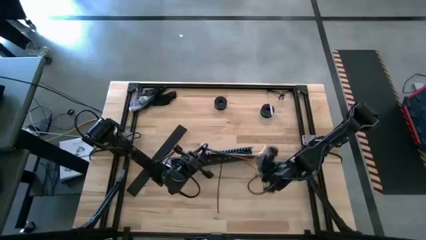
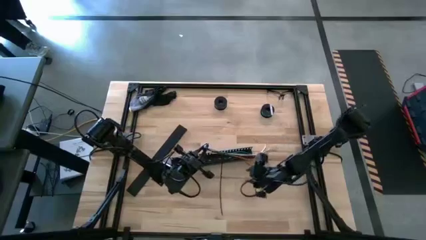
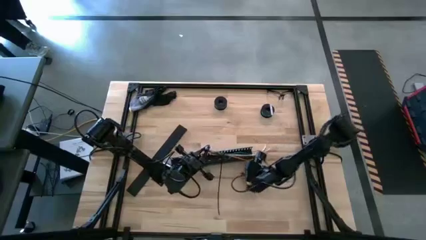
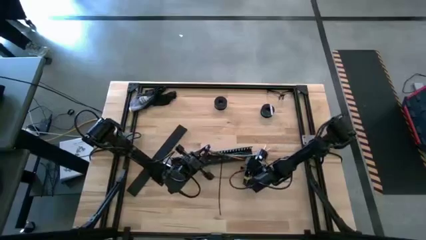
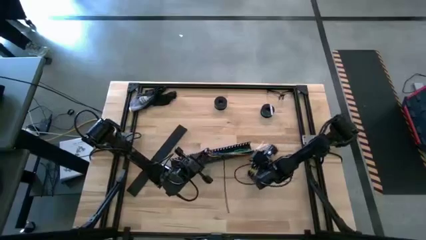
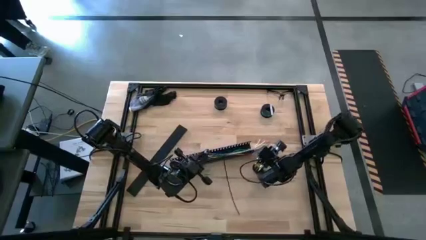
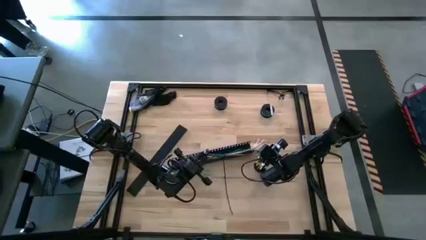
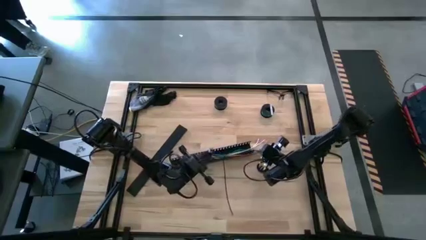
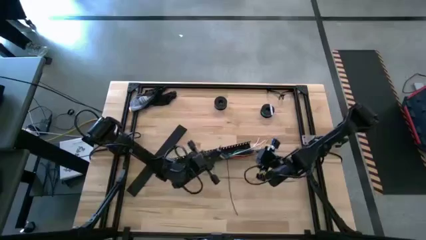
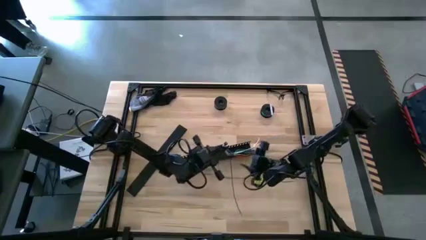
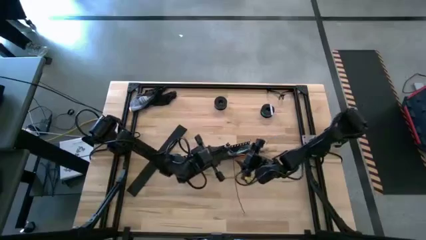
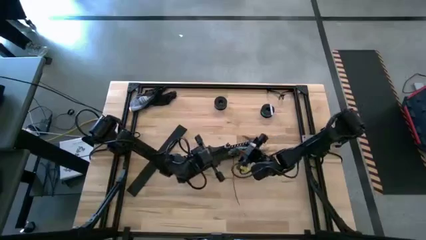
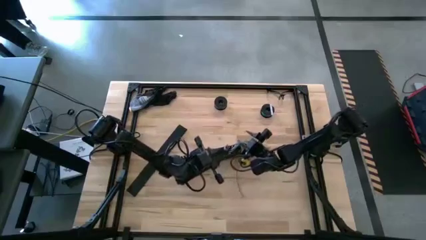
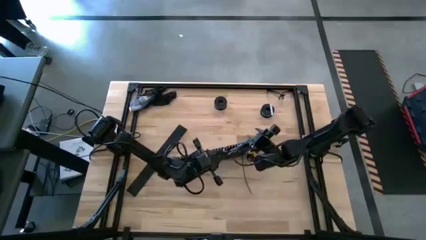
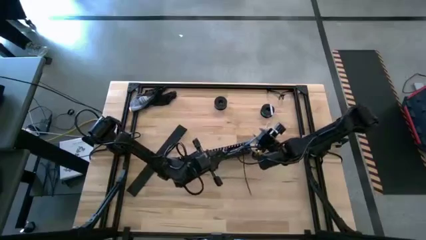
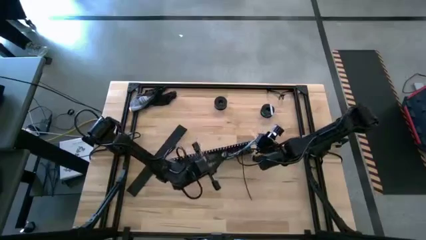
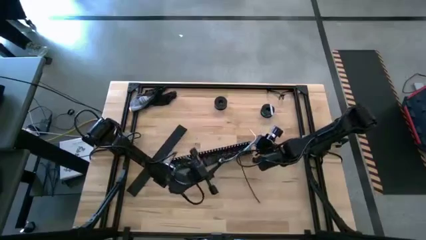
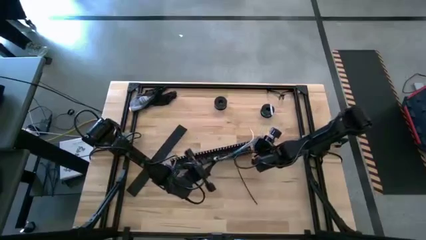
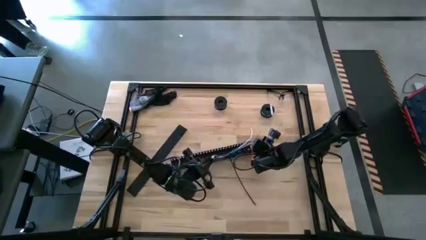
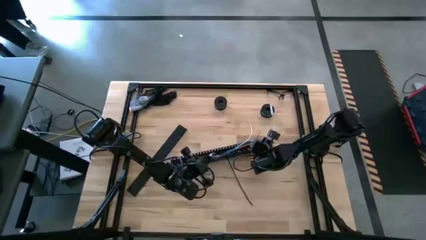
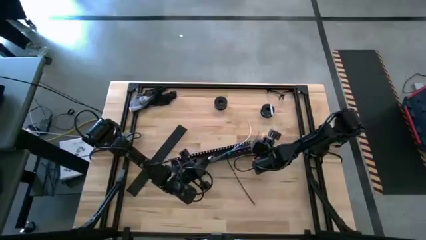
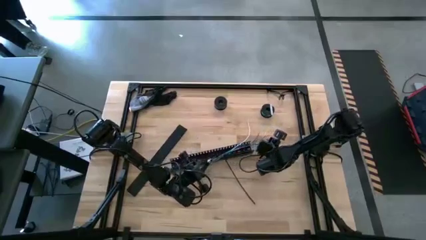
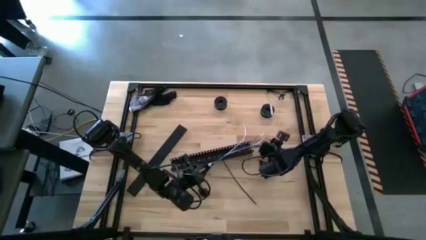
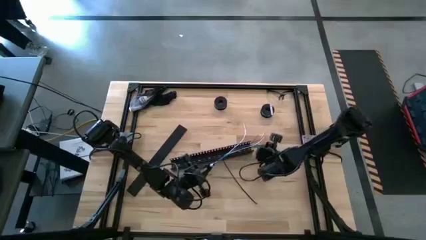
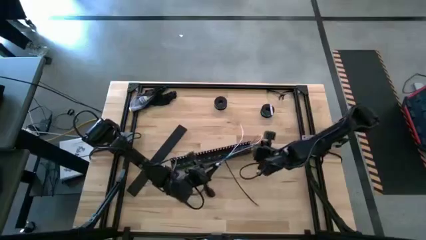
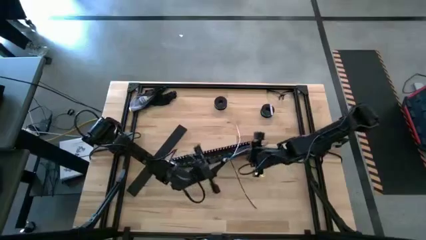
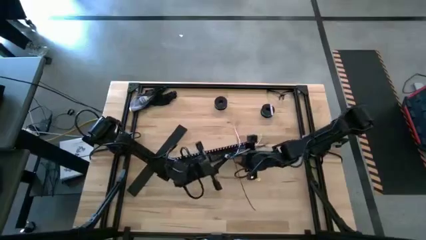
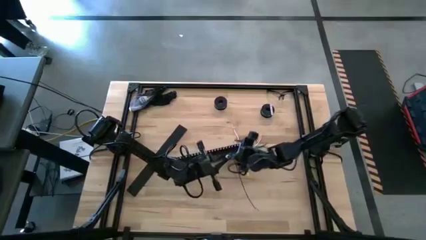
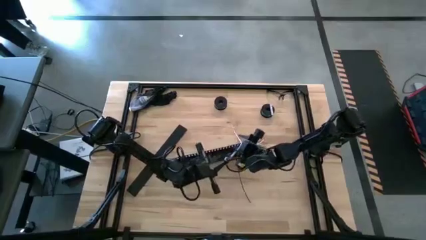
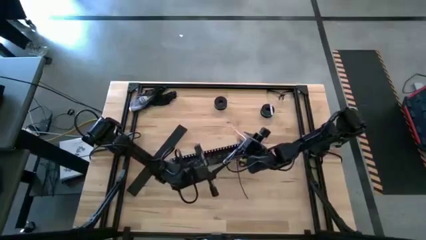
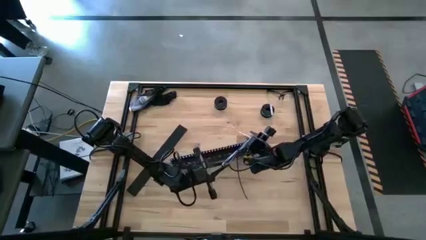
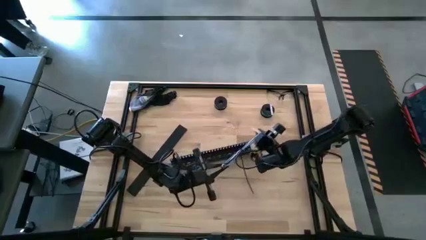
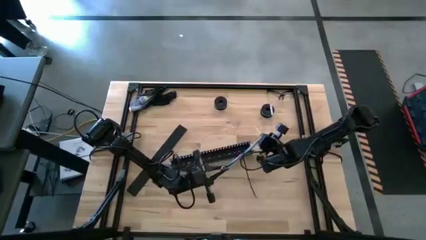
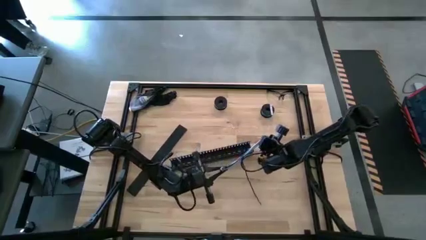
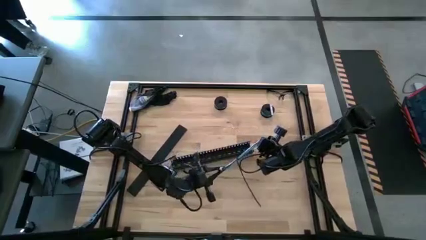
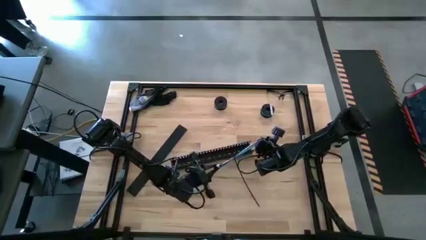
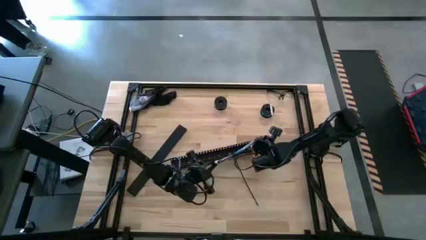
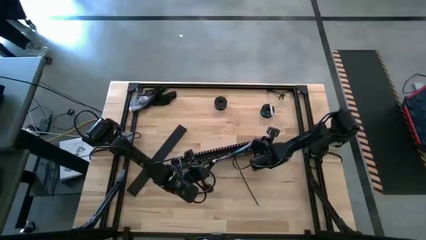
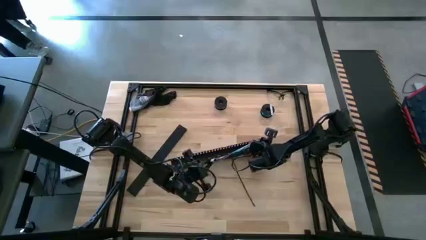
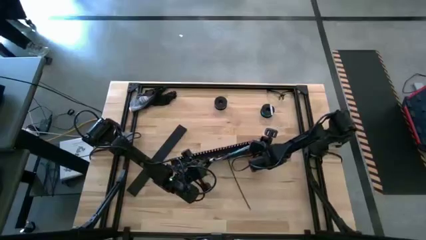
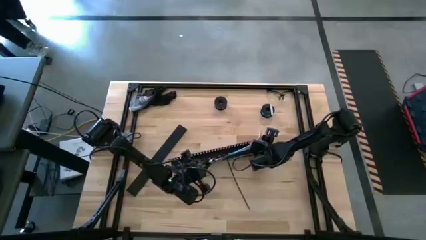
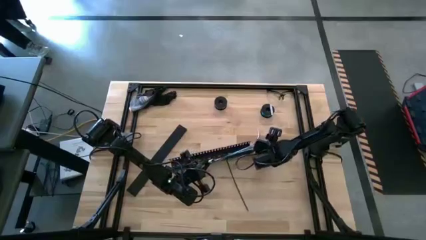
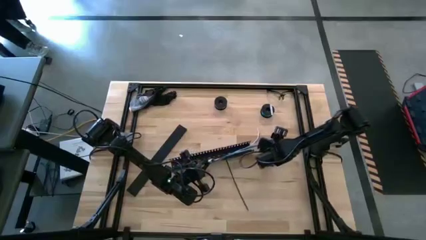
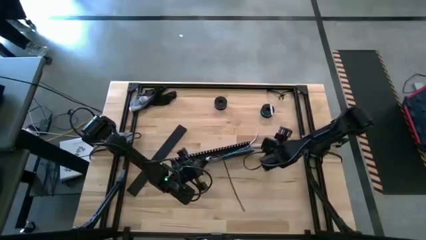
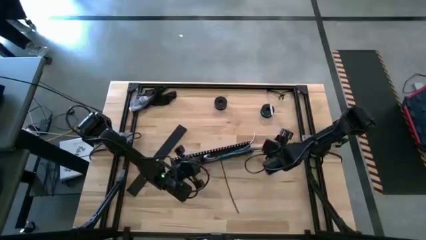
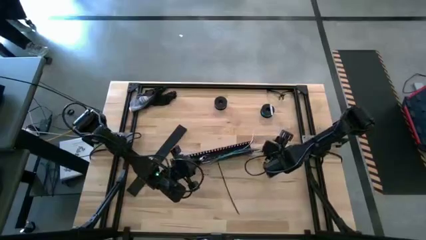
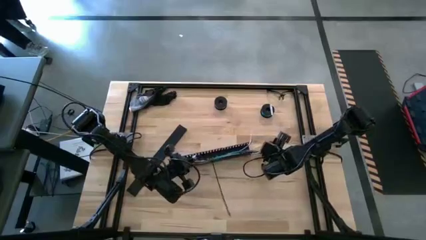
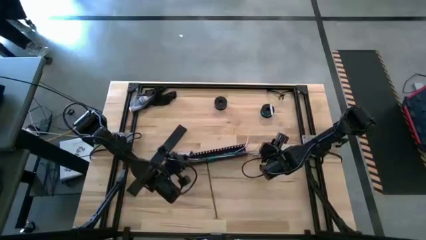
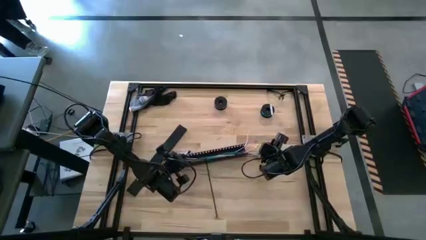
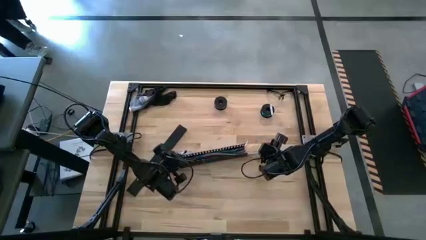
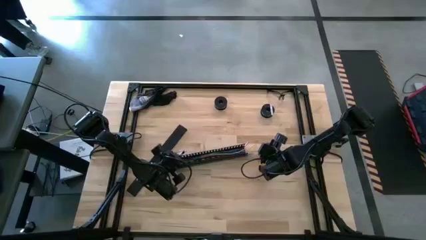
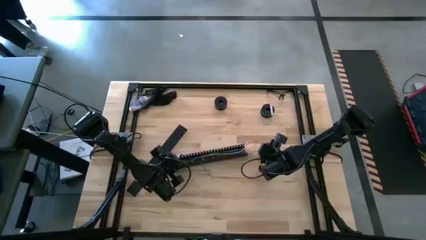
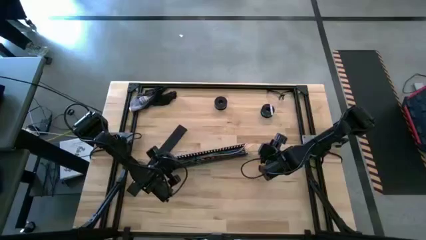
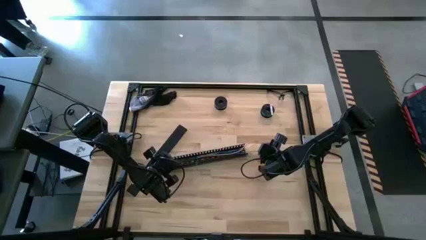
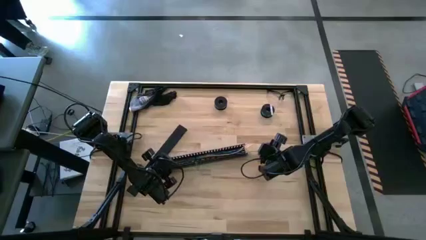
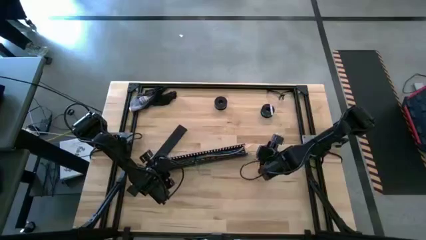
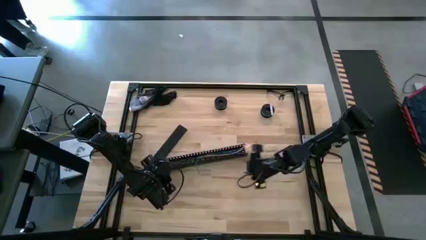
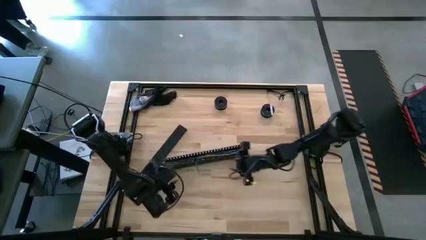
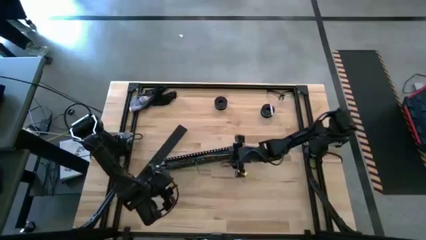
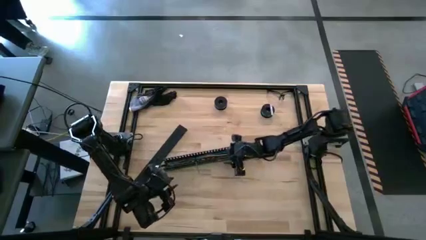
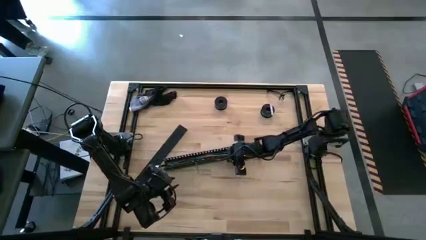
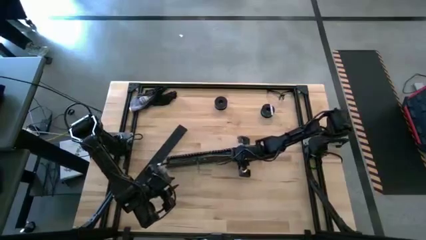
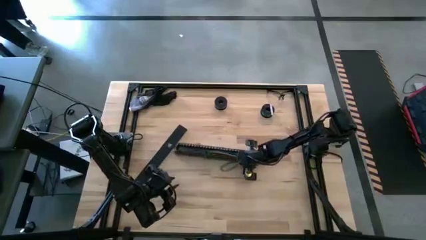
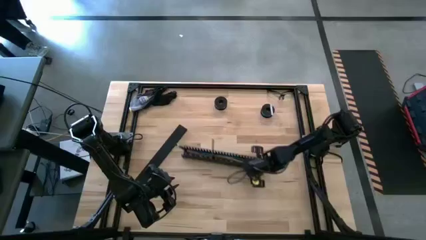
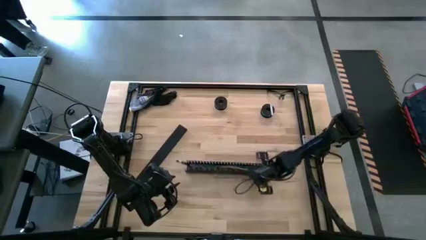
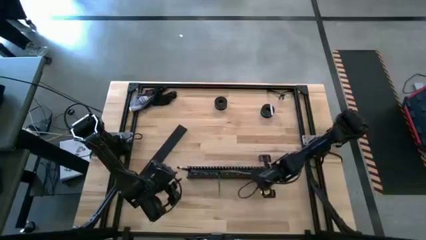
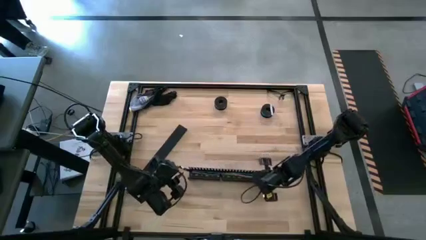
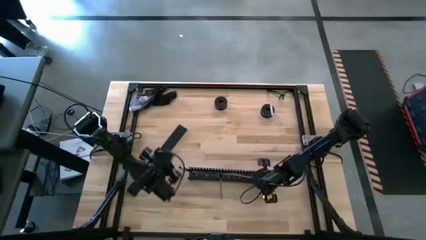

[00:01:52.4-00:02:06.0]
Task: Ziptie cables
Put the zip-tied cables into the black cable duct
